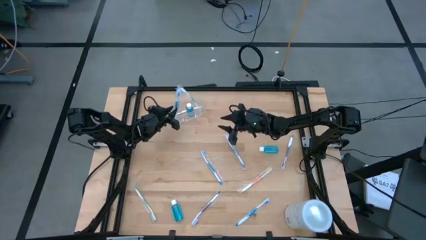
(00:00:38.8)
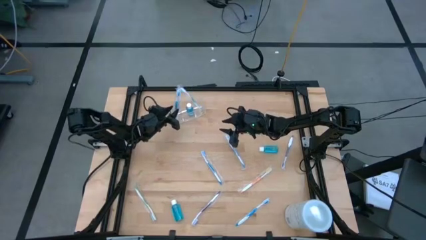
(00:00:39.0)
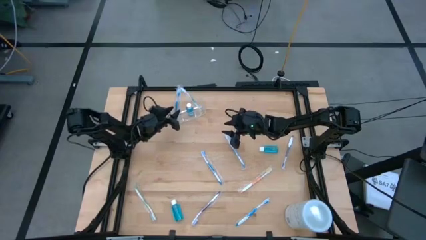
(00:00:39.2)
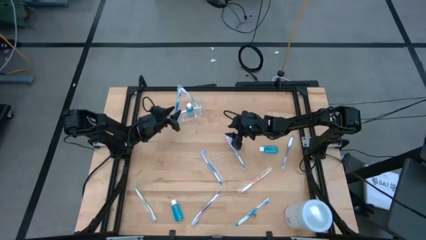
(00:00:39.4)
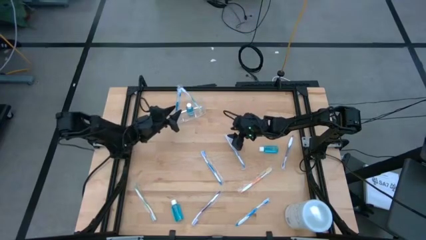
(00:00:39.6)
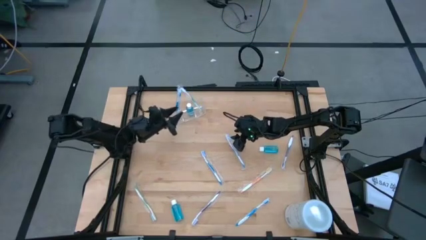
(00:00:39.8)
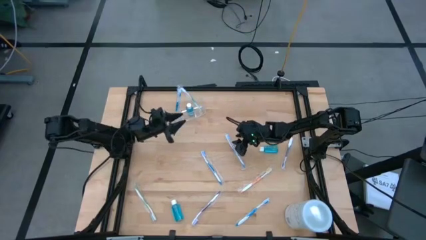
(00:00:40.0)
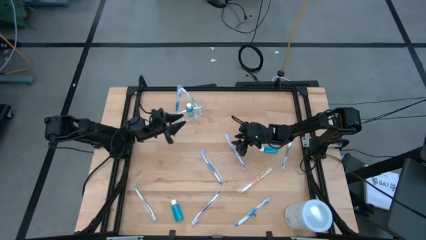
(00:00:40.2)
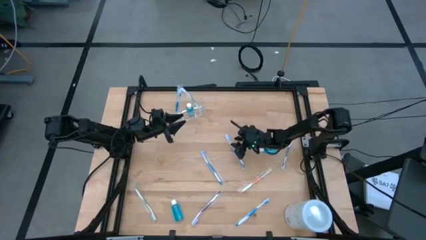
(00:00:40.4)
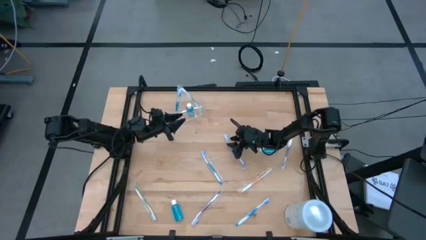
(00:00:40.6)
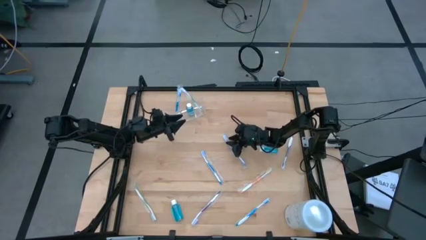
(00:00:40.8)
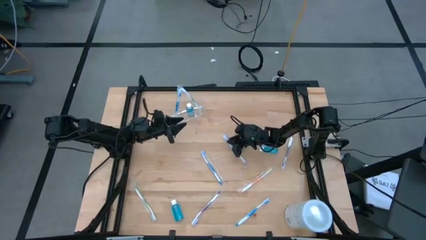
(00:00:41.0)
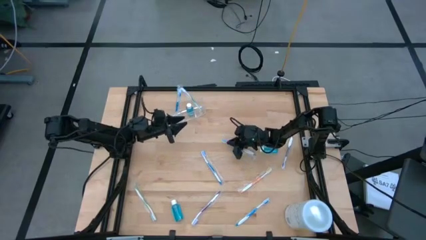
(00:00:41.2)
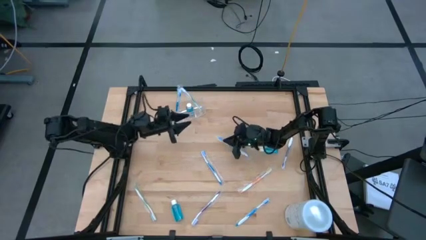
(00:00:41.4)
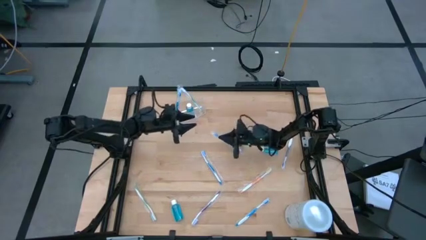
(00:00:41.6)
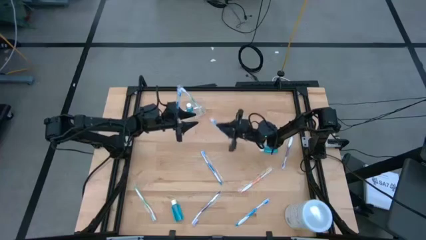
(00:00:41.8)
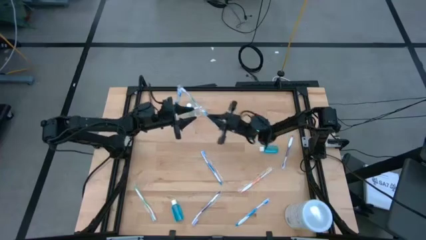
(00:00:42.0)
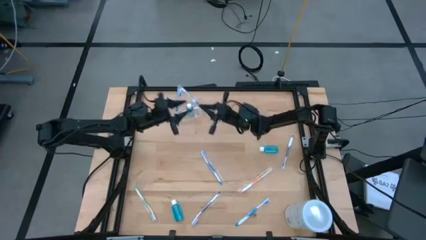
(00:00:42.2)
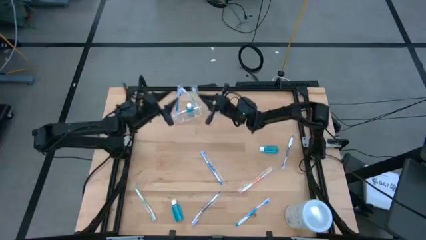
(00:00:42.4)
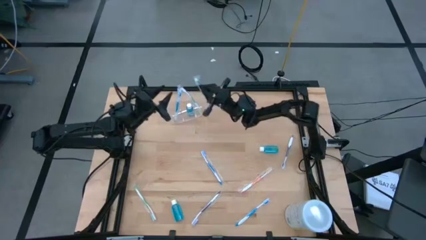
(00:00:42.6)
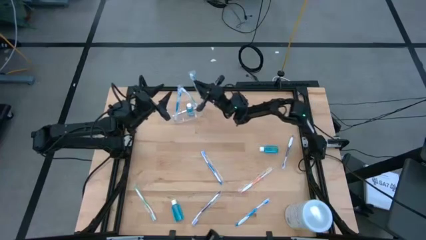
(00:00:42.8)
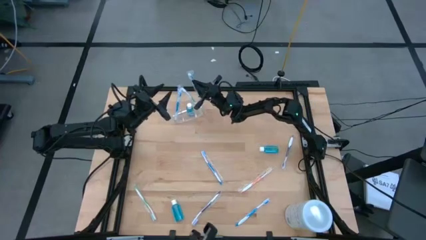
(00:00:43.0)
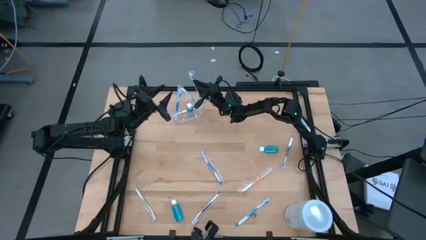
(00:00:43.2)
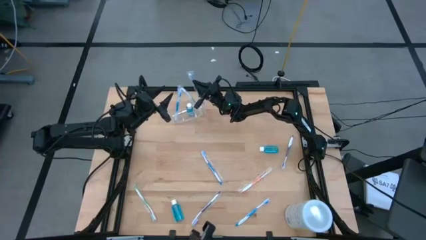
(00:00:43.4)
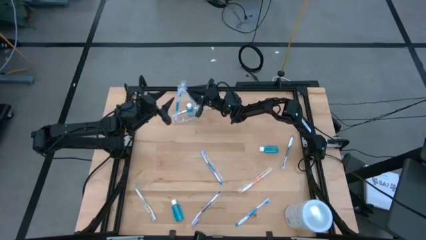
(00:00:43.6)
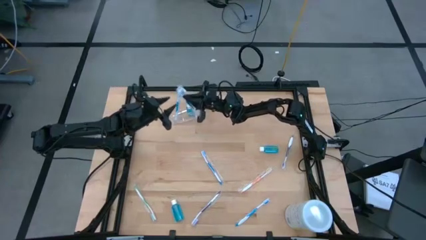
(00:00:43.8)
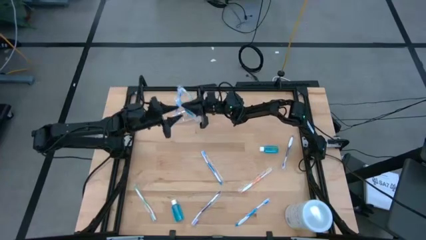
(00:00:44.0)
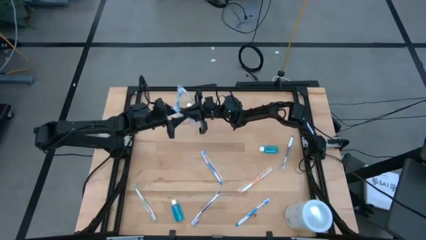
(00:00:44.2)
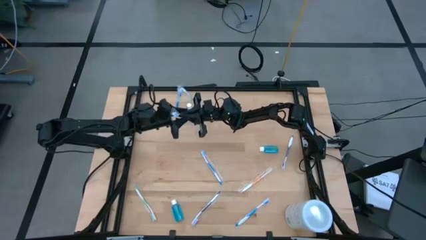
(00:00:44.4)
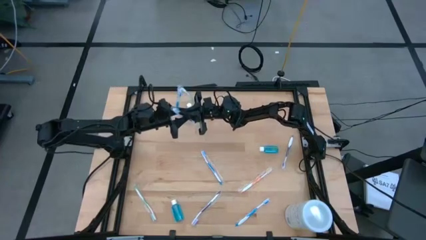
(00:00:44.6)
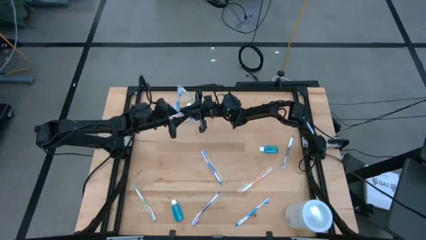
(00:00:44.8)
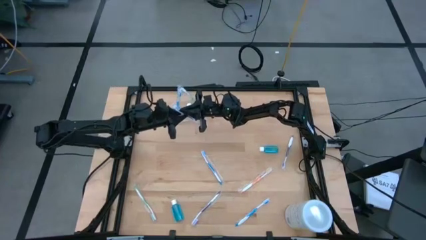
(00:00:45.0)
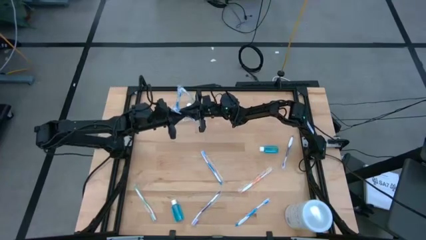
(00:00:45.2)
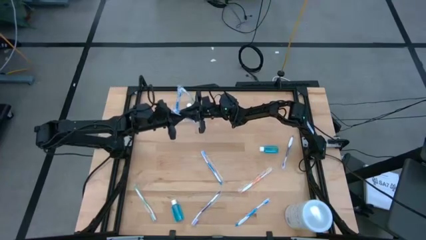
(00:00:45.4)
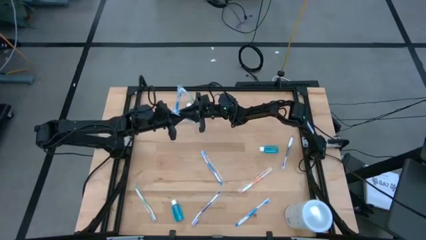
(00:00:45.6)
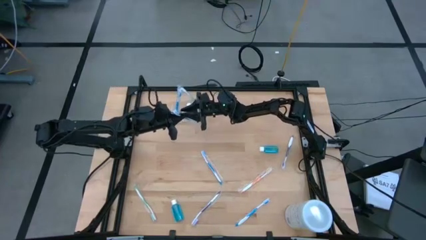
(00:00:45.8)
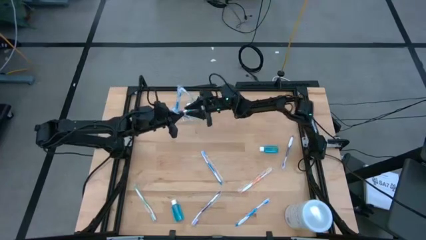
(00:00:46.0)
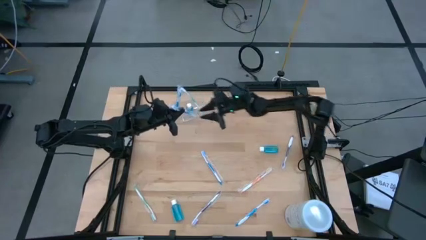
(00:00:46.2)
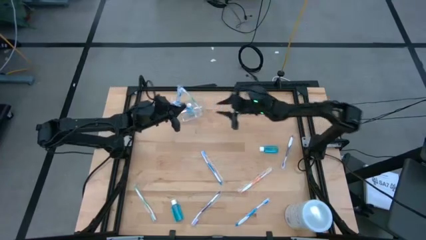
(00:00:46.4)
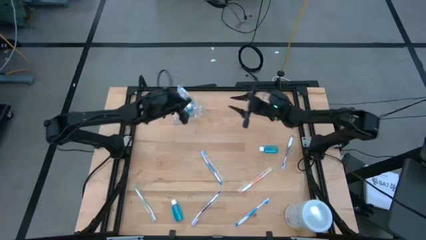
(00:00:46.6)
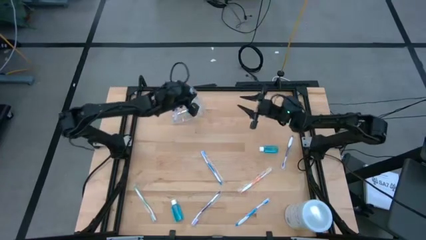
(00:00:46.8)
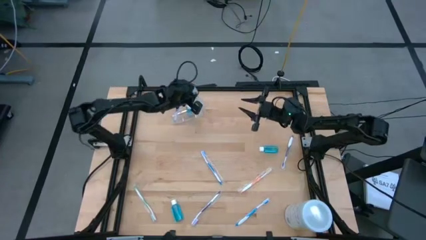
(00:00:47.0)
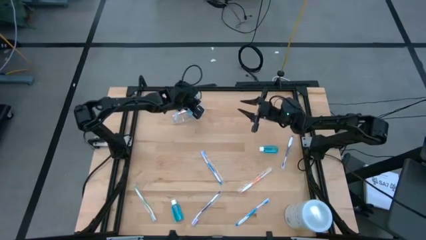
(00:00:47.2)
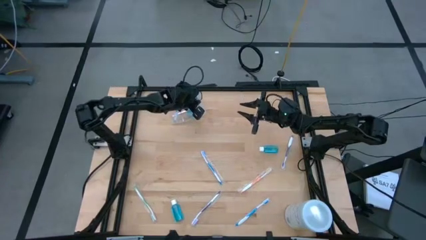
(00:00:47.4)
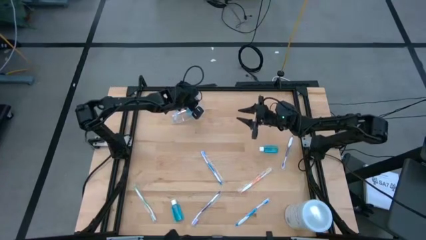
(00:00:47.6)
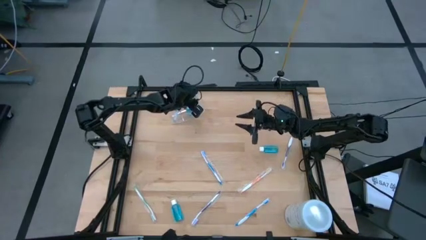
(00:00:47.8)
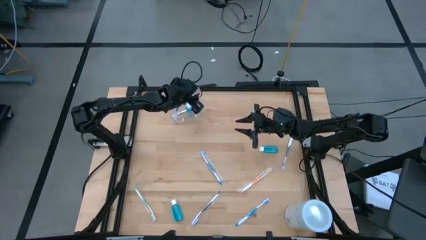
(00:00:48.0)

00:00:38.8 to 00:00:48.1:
Task: Pick & Place toothbrushing station
Put the blue toothbrush into the transparent organizer

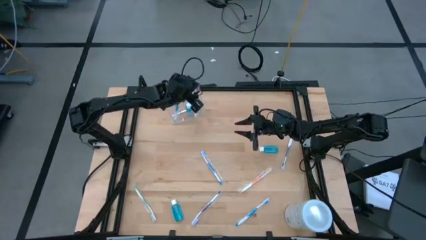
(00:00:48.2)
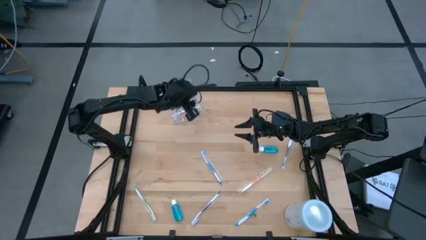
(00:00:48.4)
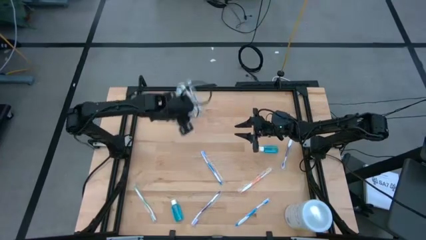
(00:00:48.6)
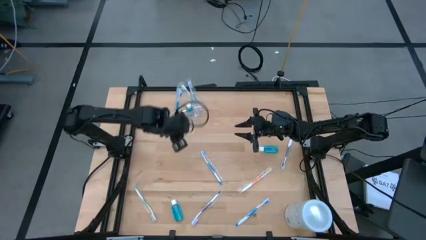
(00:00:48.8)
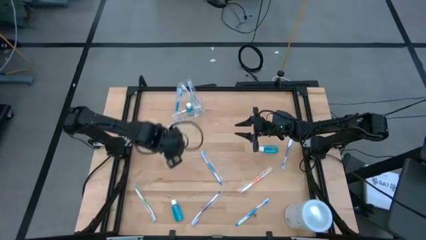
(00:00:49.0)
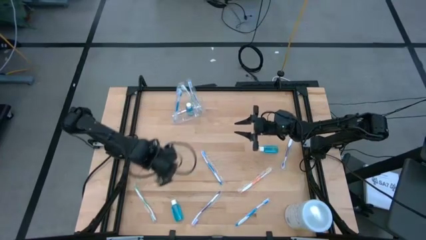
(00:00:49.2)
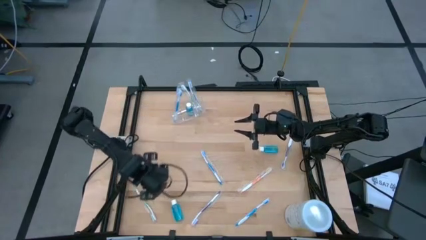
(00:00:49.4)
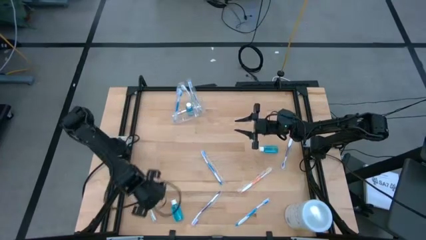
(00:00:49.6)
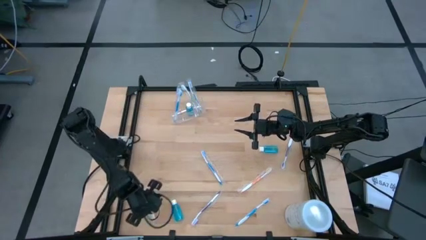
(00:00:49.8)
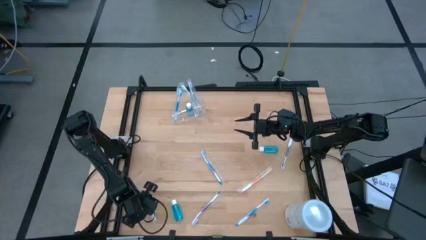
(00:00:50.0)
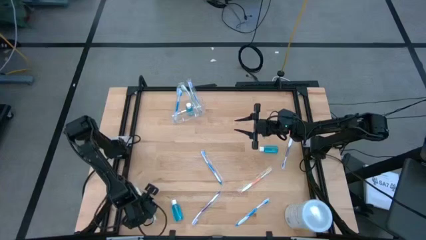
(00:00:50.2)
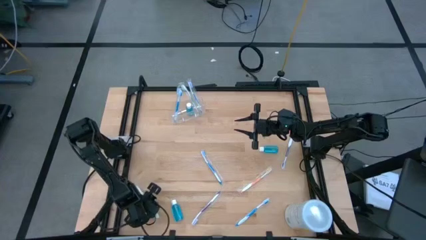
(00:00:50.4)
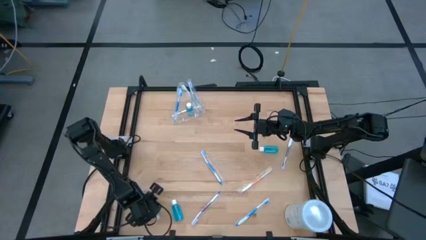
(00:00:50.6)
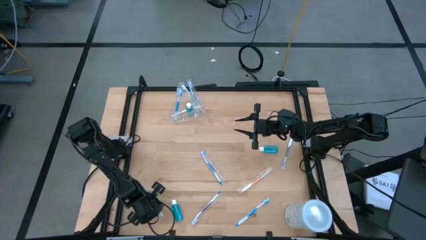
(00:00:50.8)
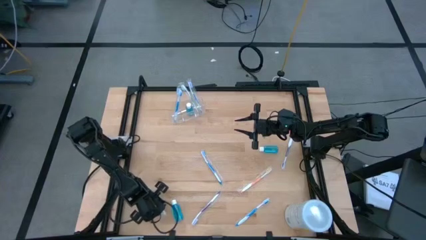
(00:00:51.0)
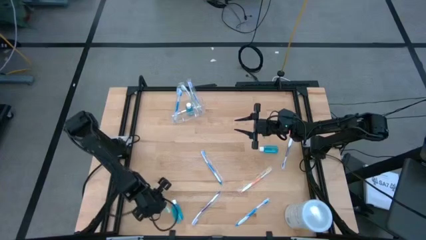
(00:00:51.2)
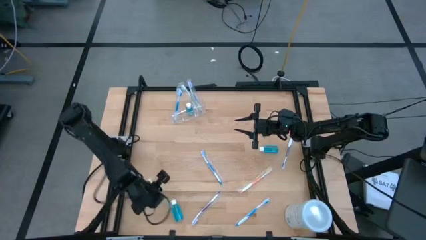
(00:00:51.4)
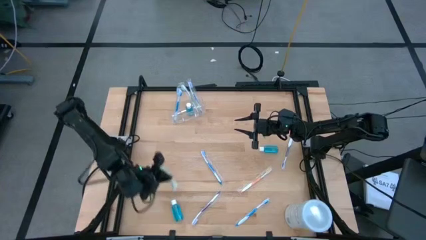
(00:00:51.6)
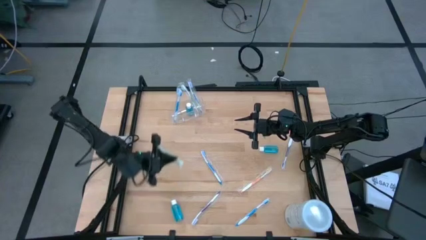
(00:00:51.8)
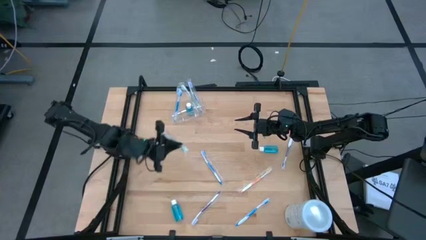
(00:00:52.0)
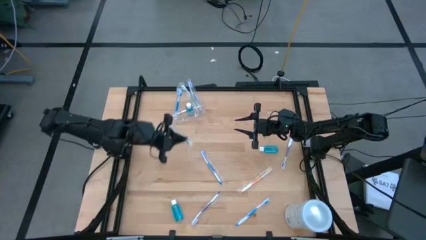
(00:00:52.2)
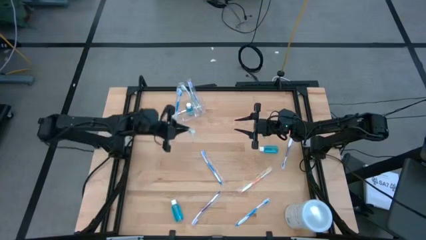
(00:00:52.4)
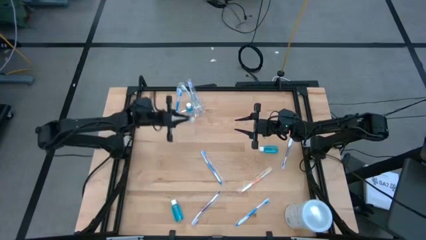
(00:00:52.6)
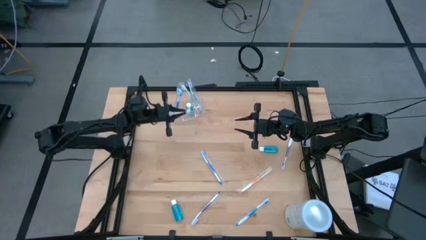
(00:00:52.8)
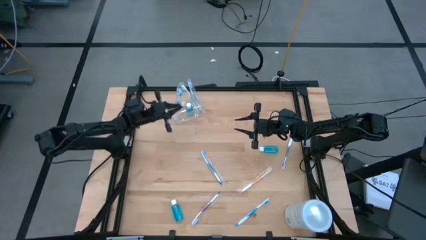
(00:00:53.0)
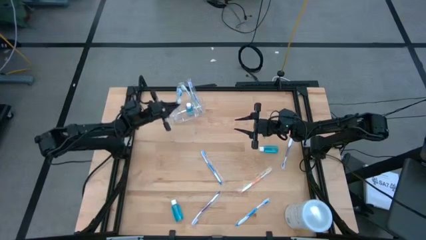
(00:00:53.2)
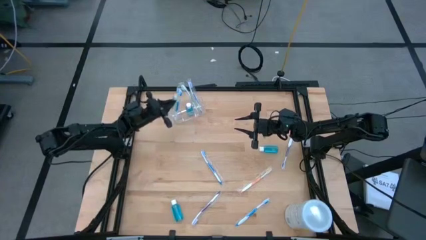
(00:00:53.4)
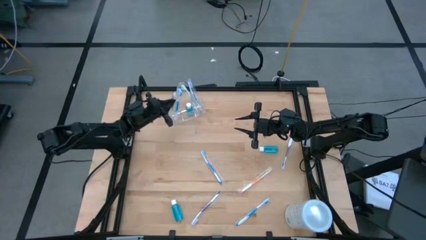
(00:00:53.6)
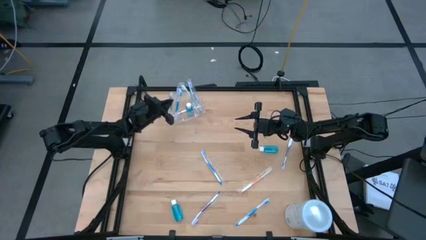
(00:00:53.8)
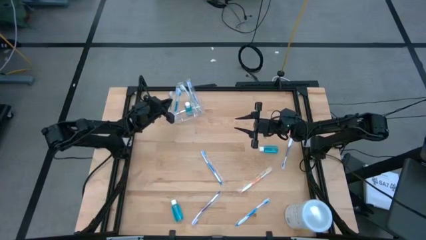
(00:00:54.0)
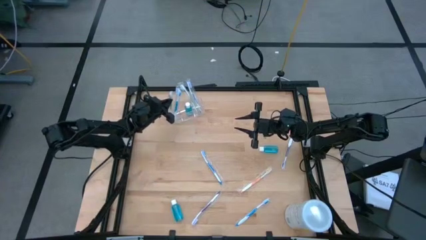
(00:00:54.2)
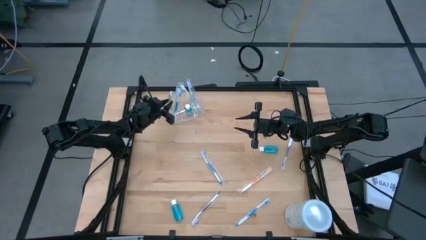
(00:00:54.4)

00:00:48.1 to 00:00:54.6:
Put the green toothbrush into the transparent organizer
